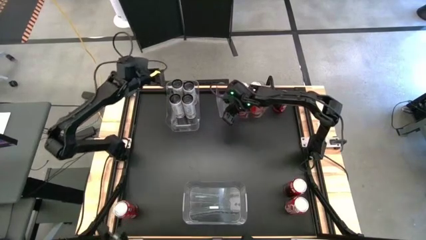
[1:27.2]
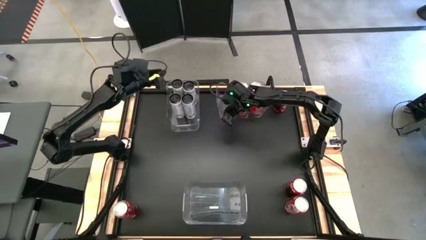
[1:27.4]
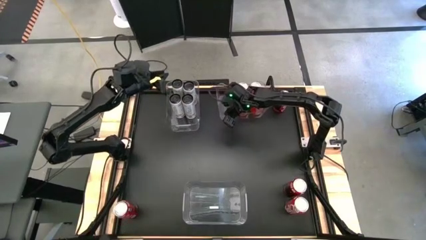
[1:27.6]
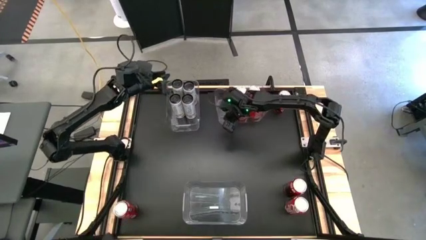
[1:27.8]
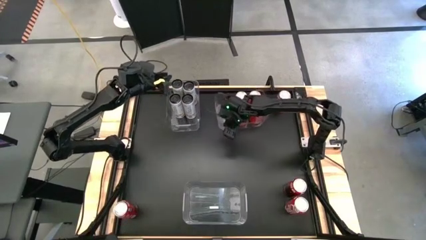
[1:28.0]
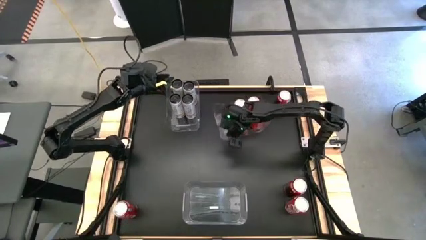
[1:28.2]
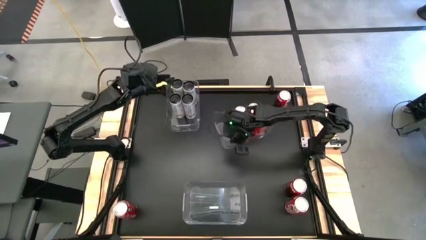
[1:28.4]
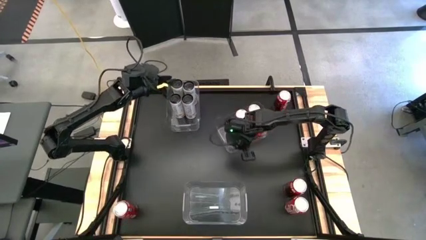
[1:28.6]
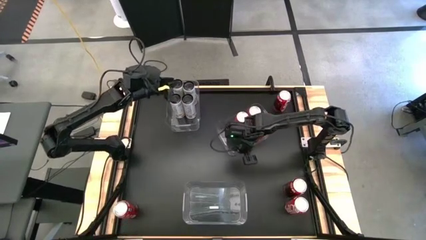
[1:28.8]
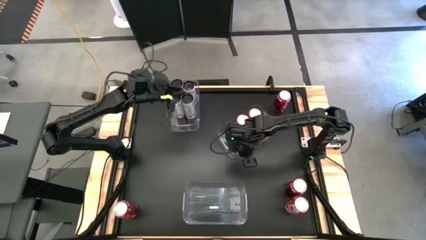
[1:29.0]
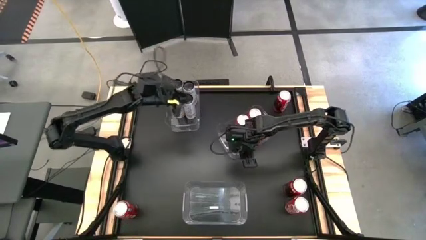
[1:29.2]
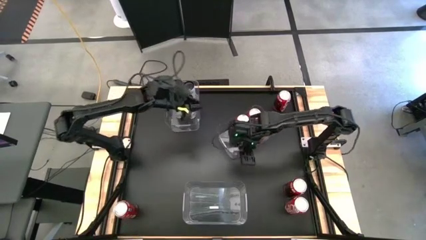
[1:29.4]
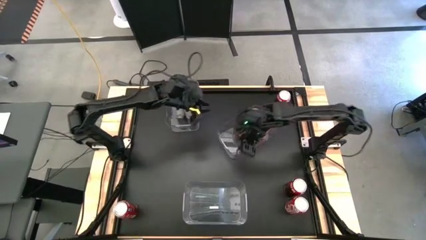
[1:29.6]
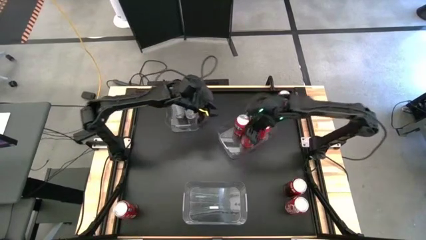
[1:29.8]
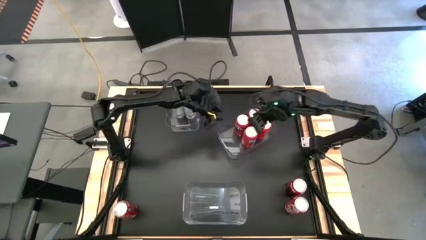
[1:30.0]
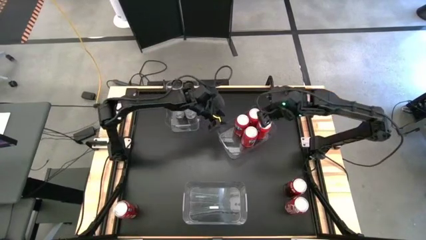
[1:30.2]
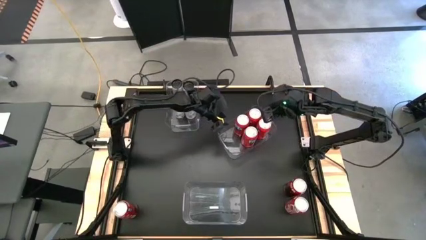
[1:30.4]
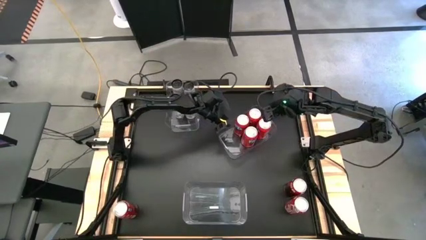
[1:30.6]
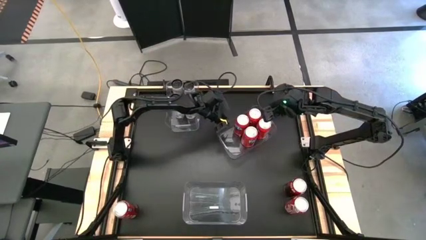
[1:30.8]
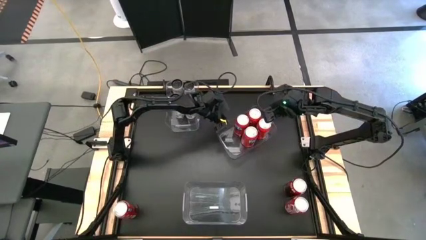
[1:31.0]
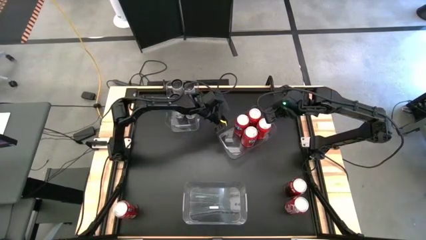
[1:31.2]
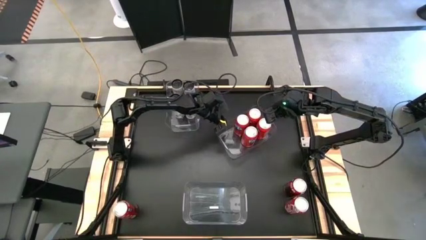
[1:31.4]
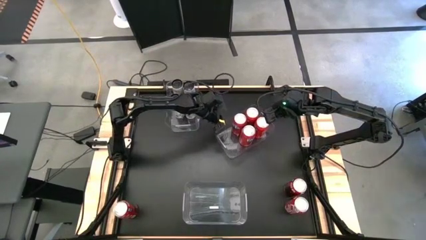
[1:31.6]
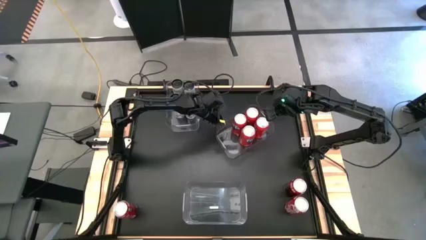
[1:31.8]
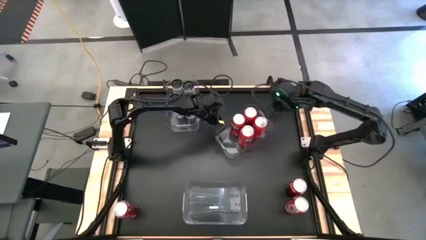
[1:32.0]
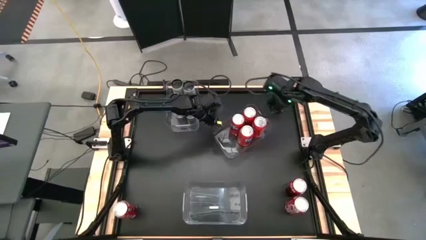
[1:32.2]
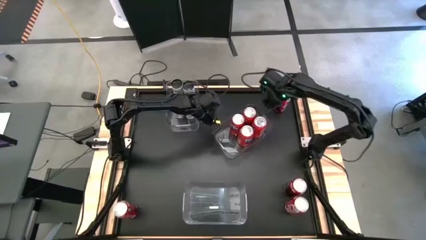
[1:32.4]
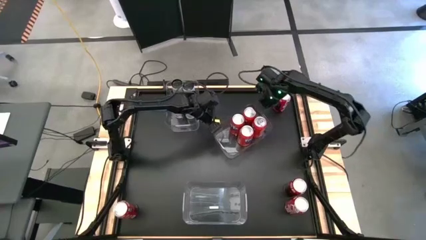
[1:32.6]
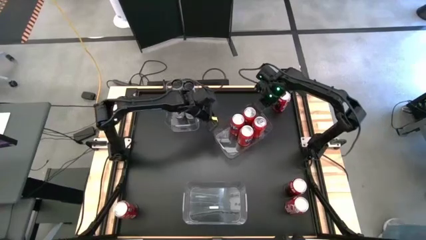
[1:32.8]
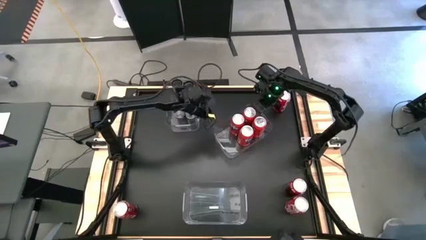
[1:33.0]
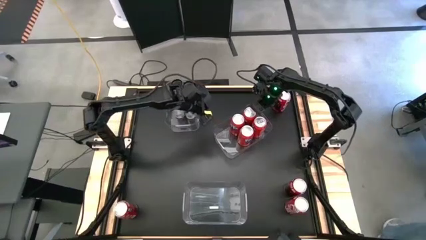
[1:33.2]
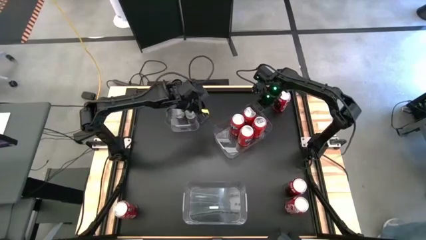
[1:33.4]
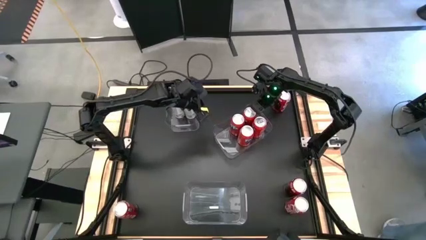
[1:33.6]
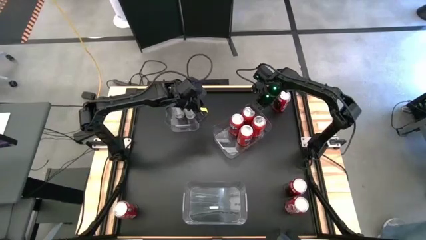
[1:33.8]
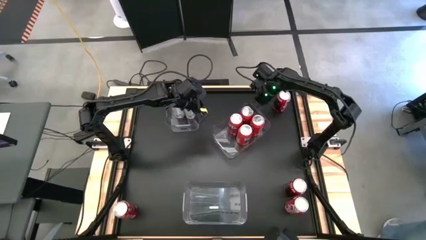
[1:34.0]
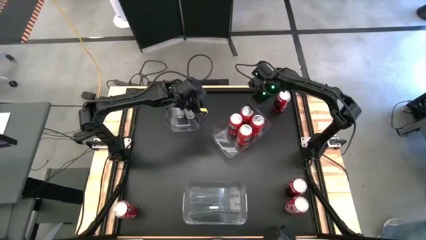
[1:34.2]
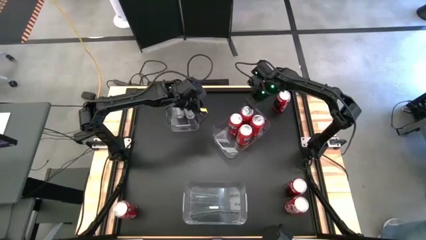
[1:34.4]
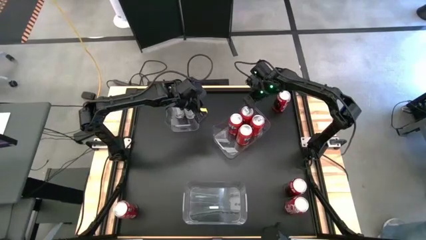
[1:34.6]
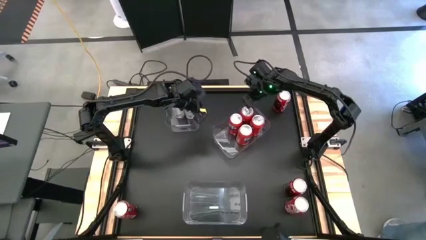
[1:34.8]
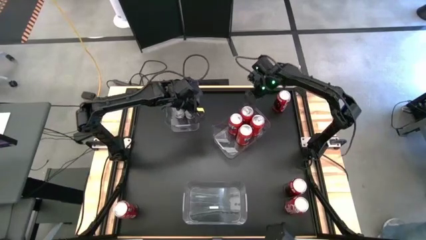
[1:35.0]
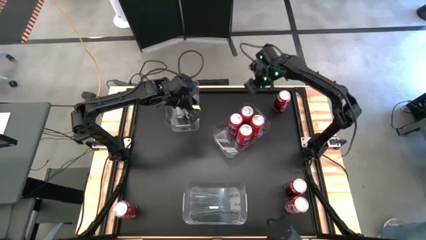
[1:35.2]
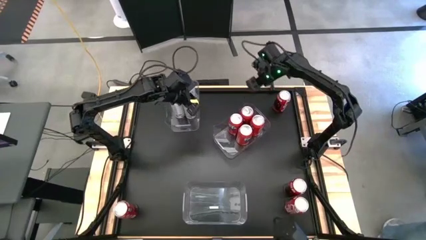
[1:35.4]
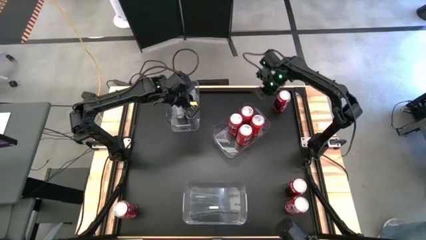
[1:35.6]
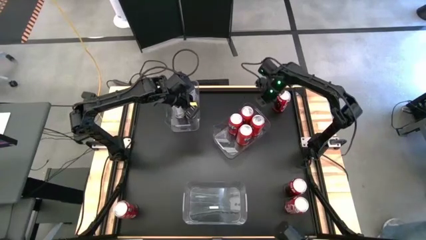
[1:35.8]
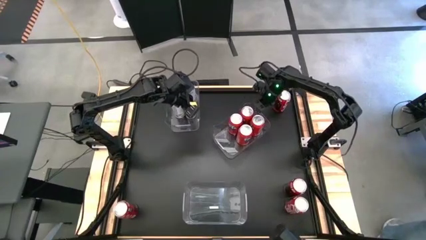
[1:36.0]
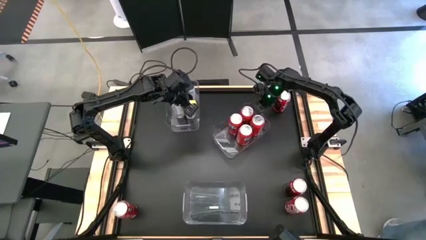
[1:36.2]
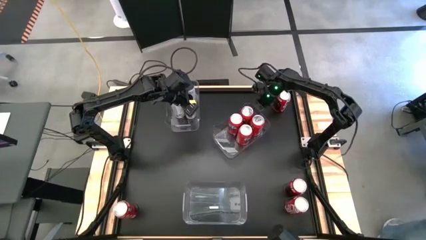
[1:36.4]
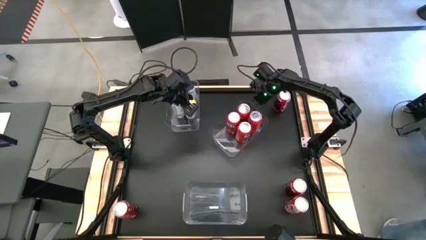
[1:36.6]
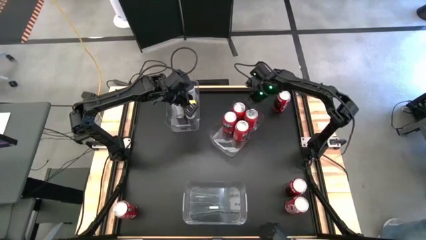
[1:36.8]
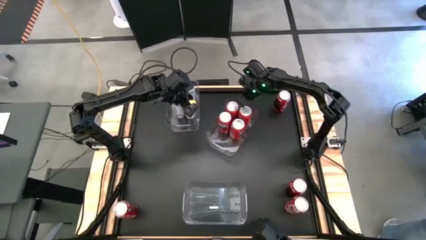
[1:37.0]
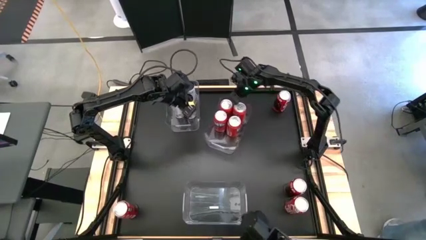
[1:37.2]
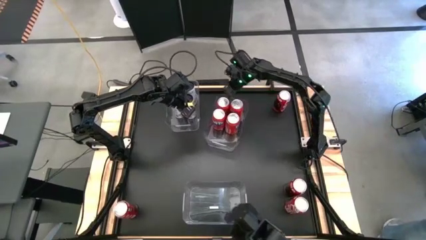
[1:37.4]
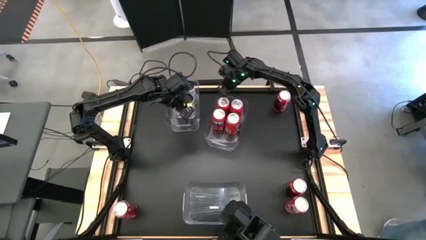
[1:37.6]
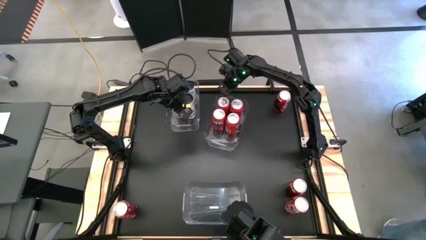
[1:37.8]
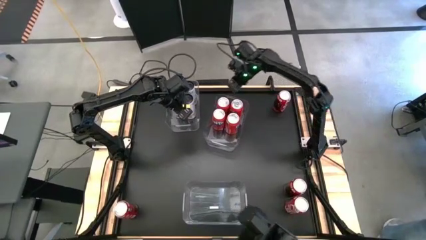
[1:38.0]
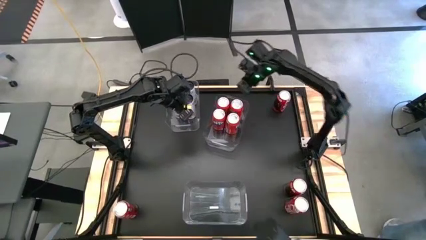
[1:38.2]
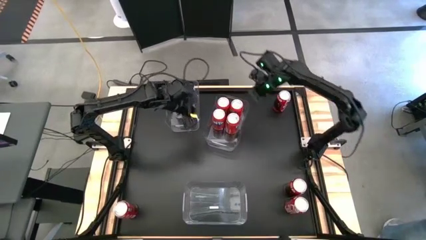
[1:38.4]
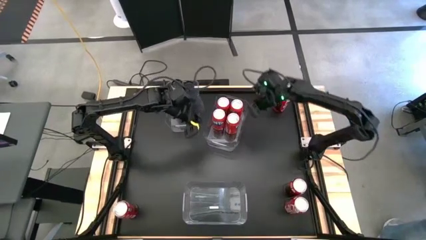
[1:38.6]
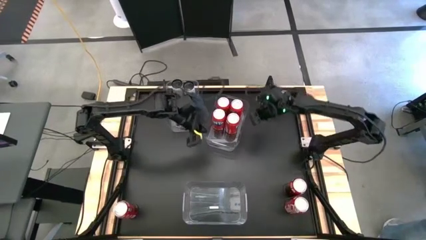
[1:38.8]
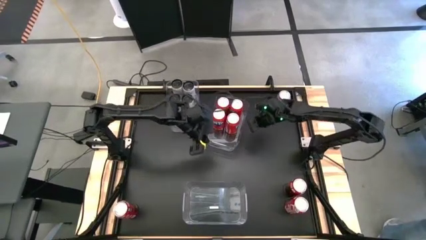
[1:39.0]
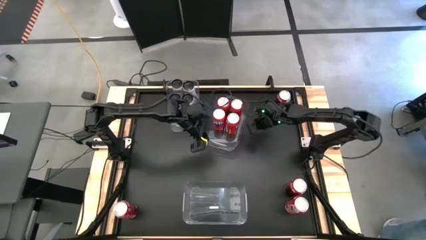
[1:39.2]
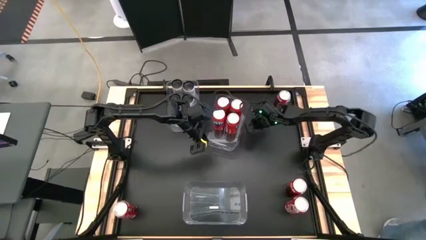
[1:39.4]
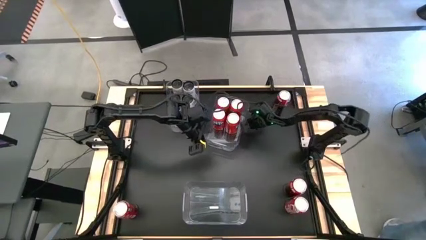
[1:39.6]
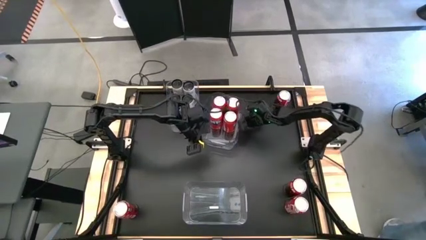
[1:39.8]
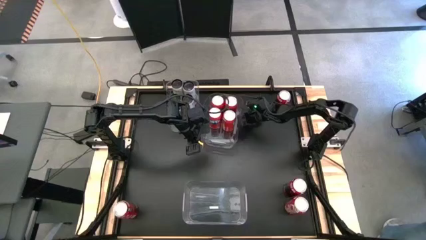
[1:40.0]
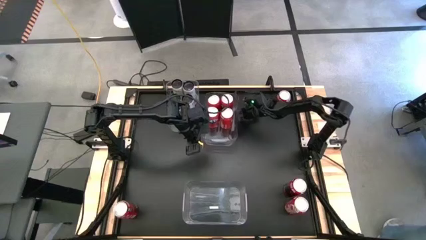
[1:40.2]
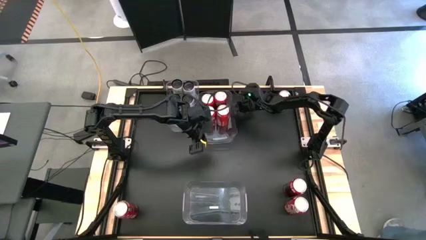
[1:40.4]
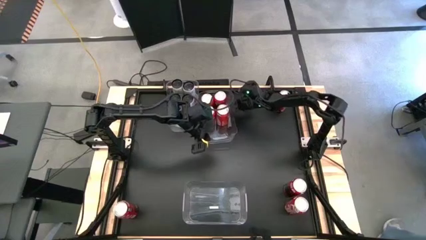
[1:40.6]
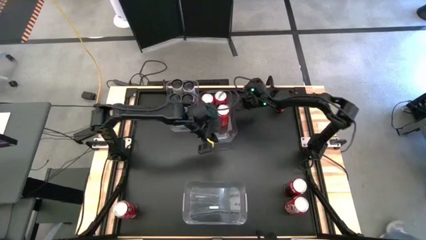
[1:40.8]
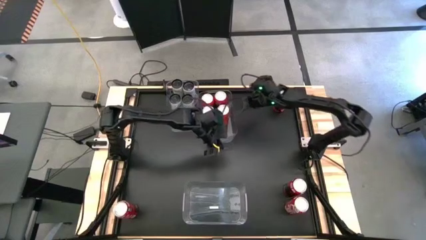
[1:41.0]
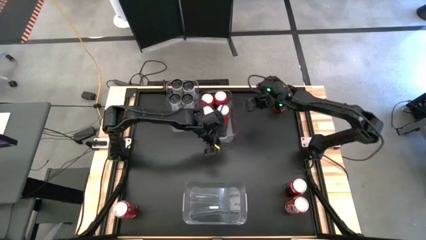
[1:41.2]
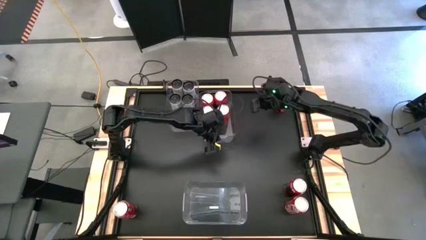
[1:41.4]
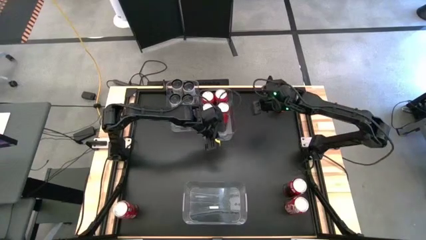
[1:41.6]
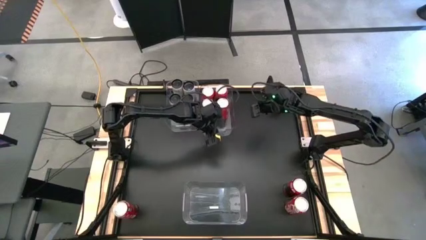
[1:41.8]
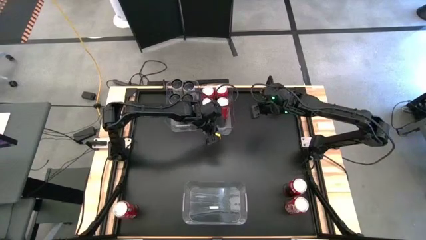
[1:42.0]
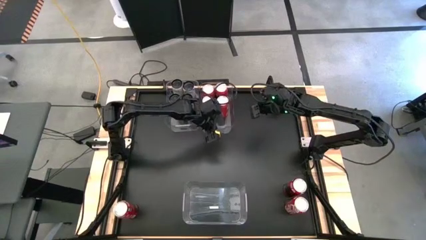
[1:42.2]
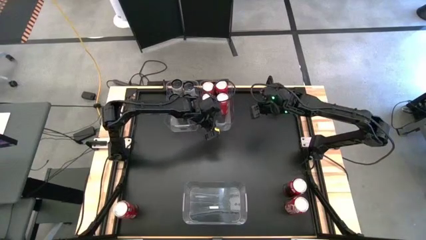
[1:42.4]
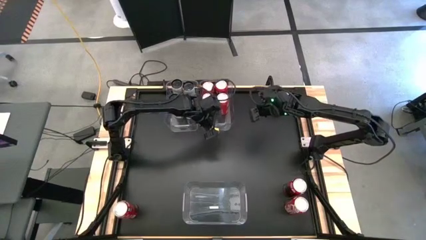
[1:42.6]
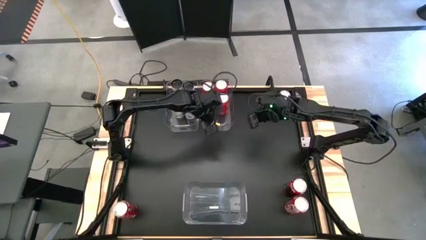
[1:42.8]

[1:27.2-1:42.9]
Task: Sort soda cans
Adjust the top transparent bin
